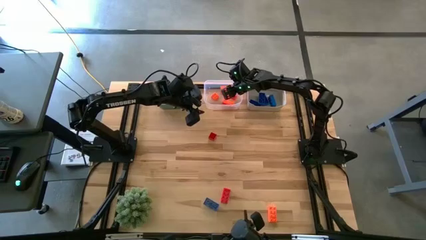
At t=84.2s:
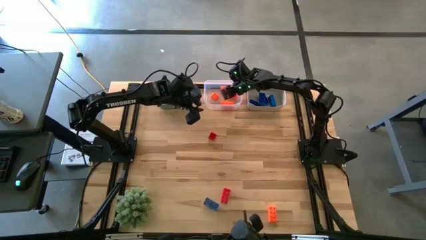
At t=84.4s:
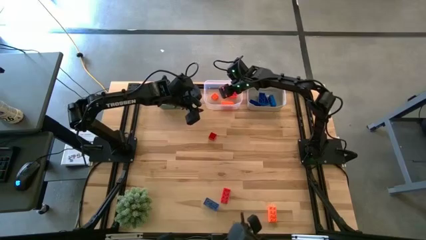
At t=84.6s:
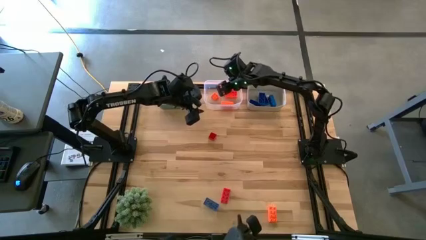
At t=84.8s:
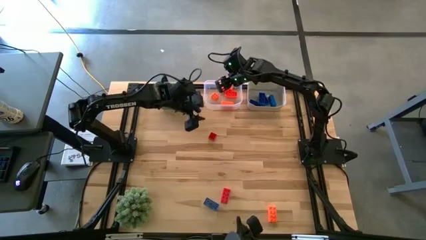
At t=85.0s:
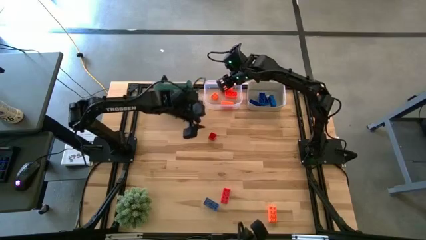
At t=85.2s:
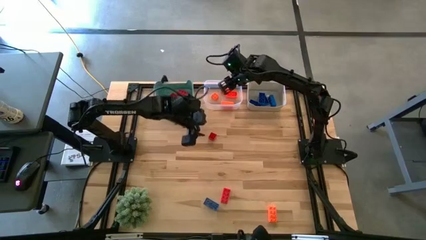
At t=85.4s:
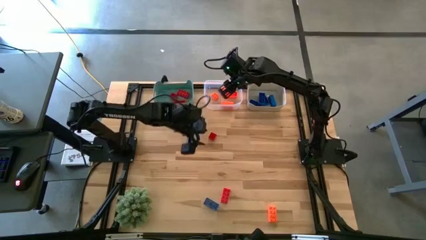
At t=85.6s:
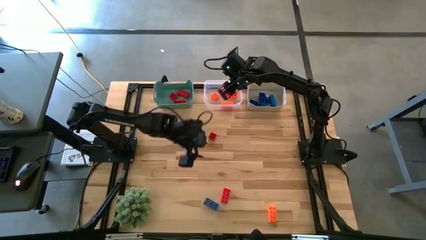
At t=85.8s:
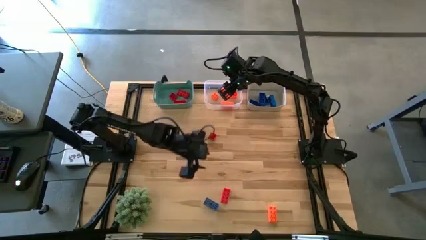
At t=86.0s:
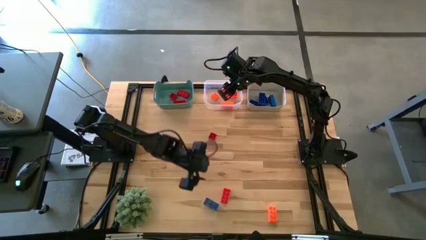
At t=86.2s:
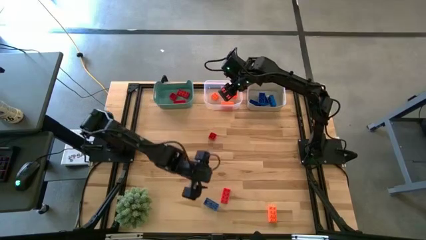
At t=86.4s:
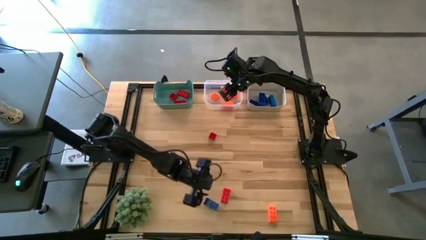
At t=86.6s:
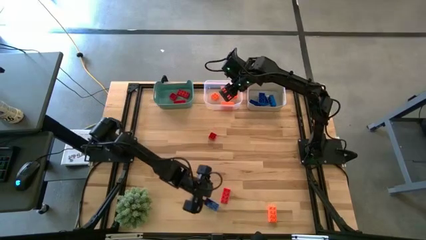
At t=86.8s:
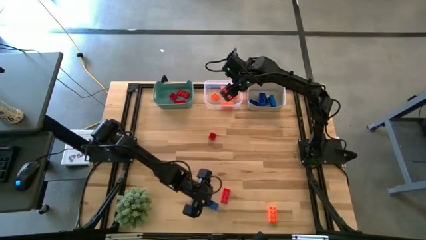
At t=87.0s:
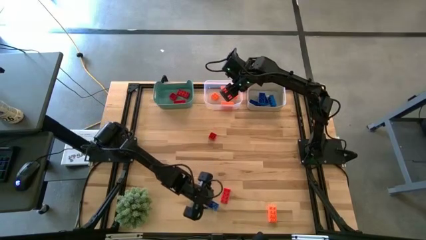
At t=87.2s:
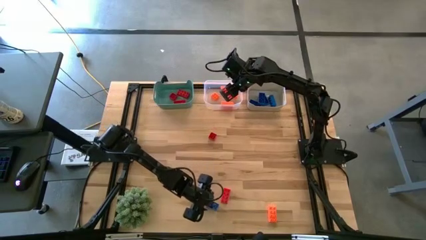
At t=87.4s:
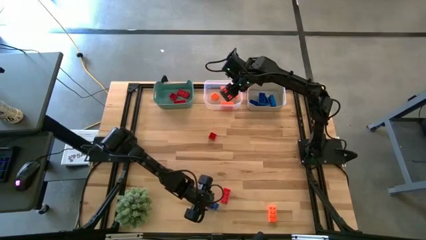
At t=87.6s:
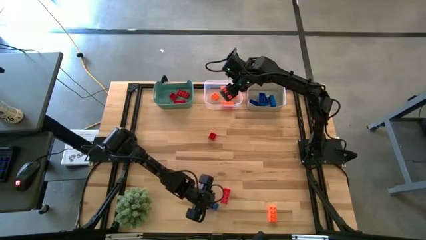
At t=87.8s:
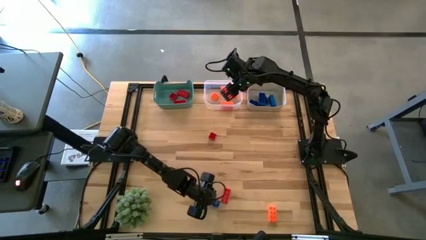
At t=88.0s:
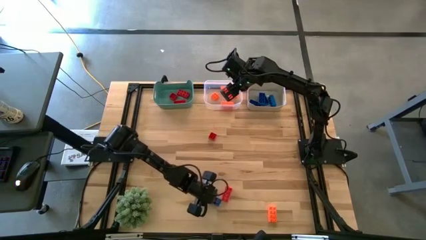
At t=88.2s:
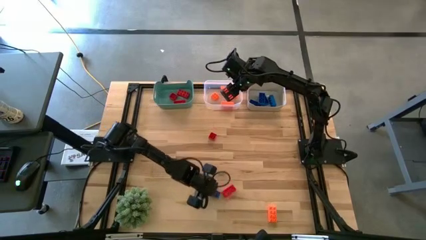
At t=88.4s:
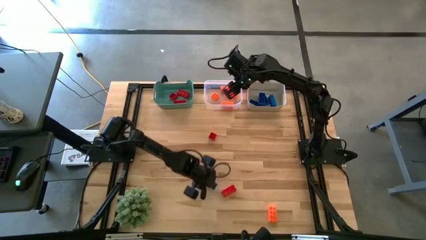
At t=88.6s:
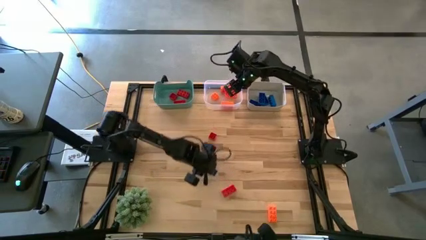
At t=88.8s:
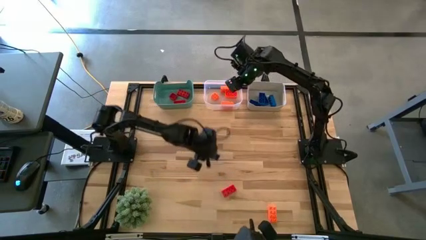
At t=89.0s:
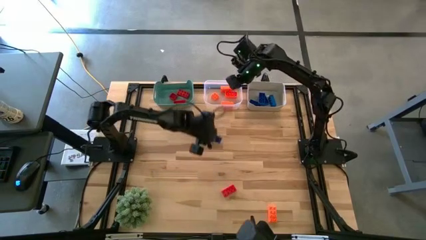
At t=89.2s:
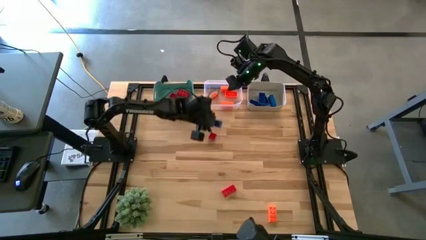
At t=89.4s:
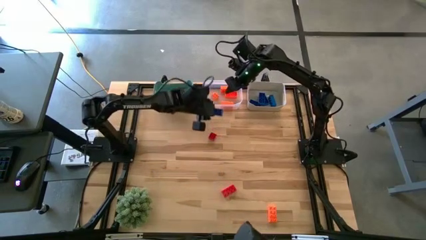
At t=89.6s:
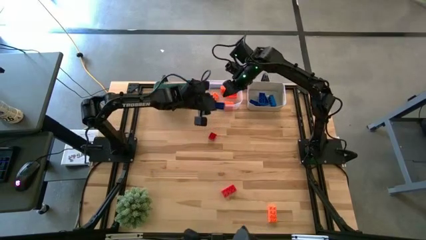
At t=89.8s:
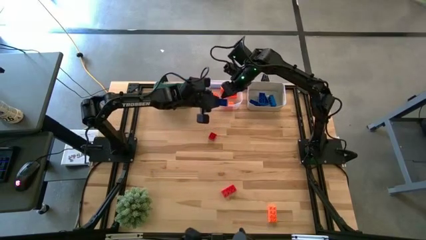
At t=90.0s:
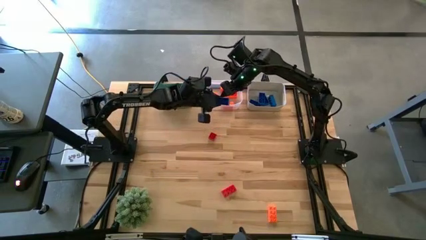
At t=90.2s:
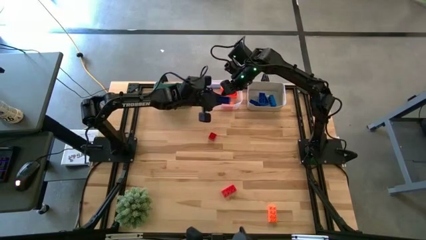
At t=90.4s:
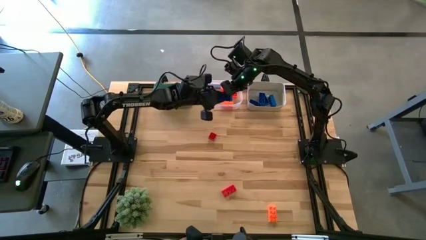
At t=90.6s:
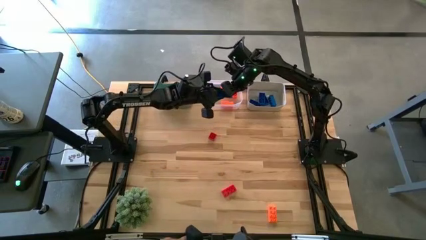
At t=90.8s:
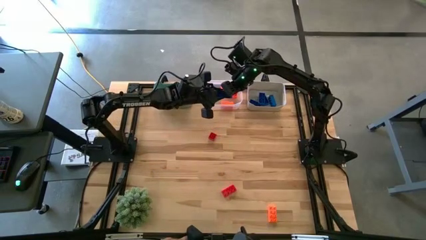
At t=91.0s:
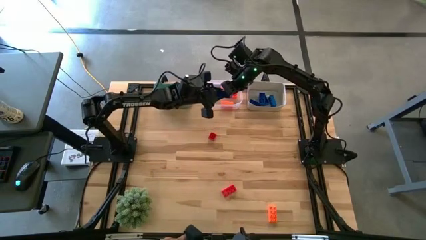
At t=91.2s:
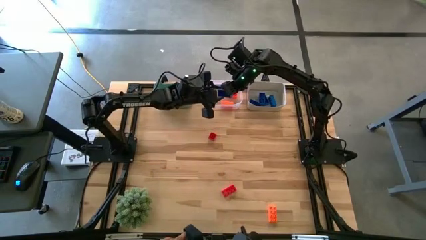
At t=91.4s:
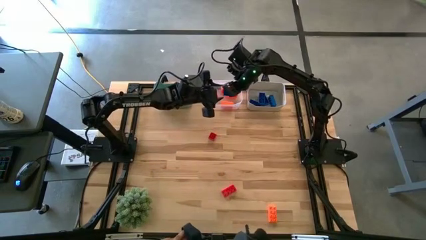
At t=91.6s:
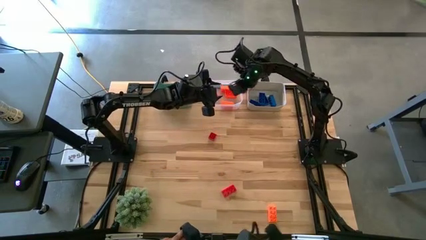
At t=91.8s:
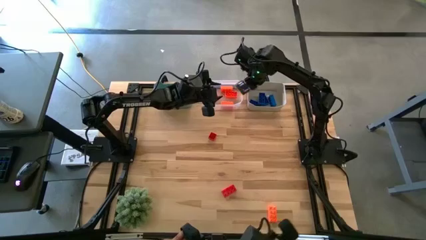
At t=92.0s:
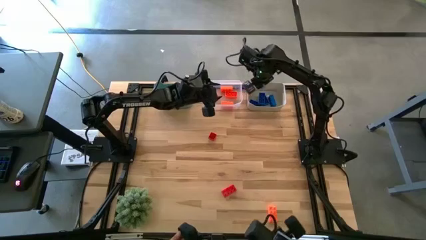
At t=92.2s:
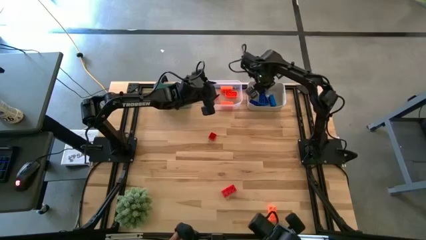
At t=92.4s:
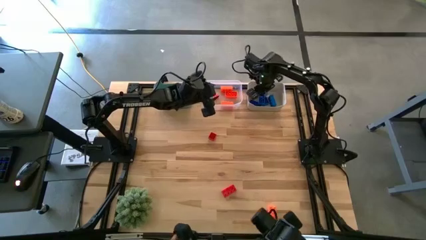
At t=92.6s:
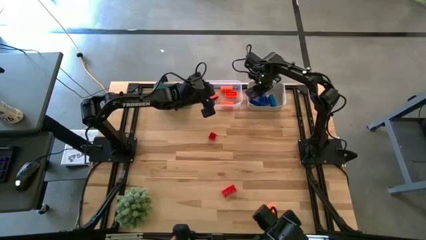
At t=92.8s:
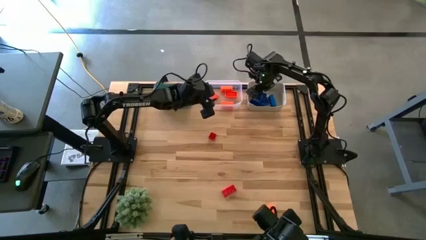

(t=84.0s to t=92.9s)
Task: Sort & place blocks by color
Put the blue game piece into the white bin

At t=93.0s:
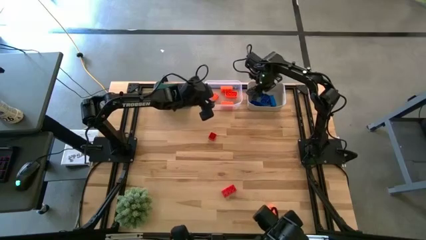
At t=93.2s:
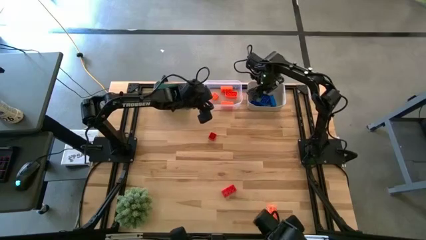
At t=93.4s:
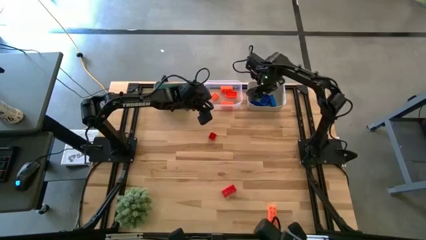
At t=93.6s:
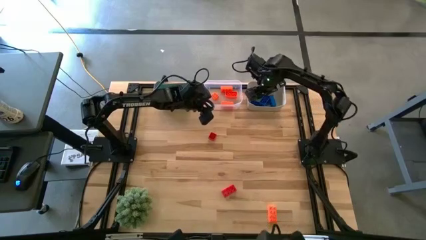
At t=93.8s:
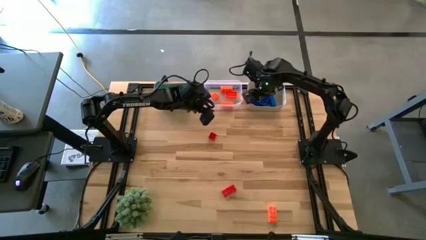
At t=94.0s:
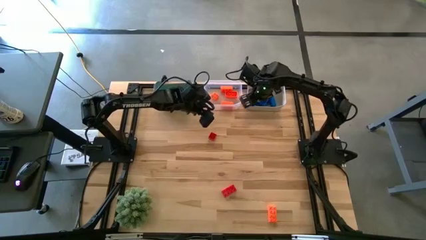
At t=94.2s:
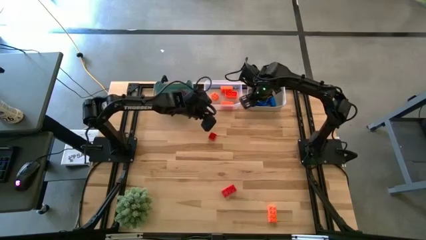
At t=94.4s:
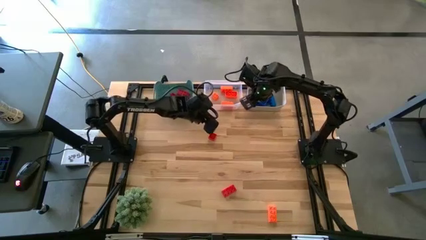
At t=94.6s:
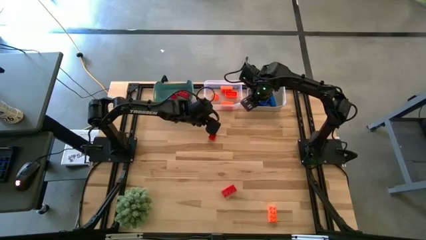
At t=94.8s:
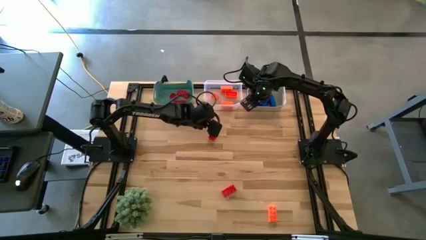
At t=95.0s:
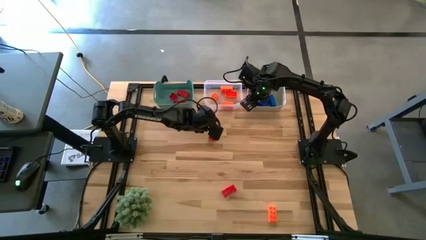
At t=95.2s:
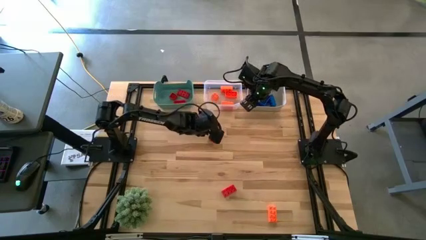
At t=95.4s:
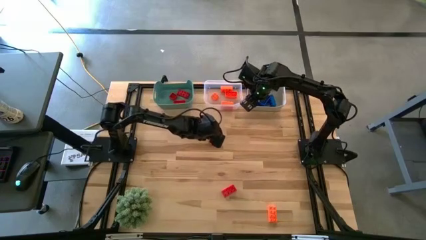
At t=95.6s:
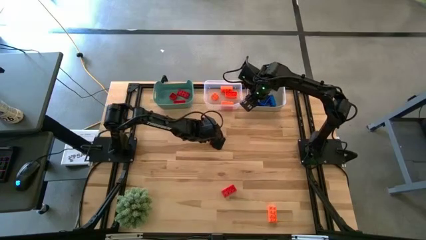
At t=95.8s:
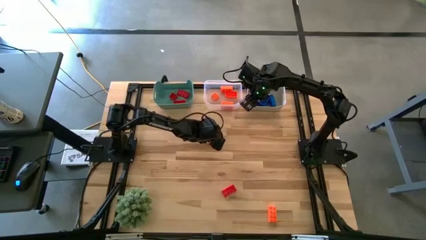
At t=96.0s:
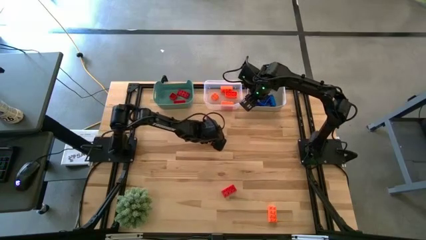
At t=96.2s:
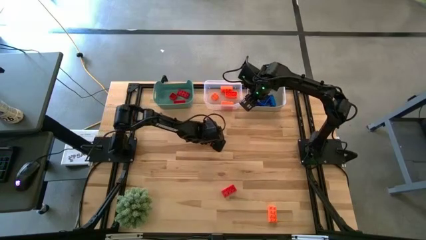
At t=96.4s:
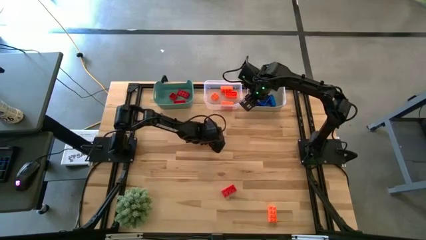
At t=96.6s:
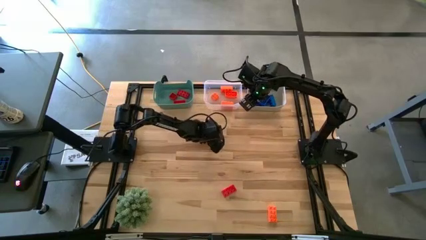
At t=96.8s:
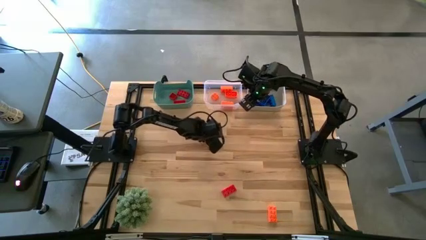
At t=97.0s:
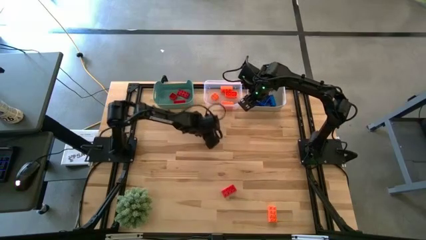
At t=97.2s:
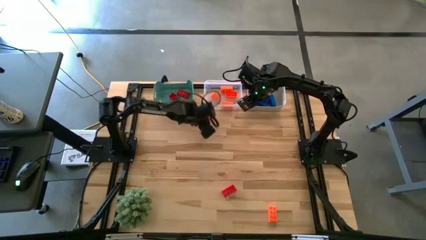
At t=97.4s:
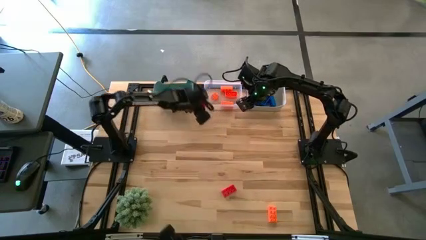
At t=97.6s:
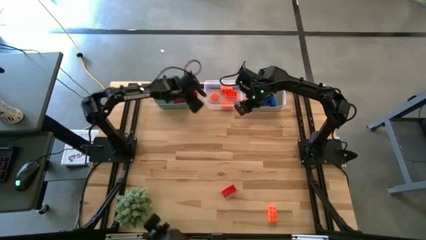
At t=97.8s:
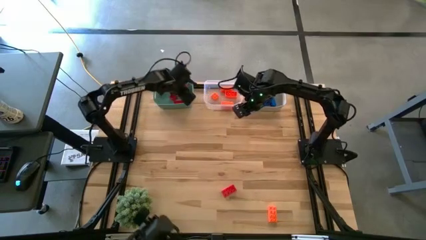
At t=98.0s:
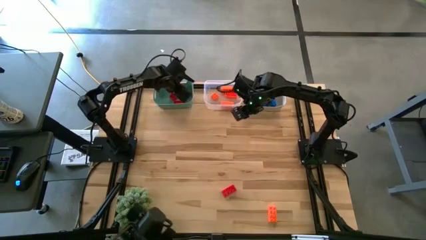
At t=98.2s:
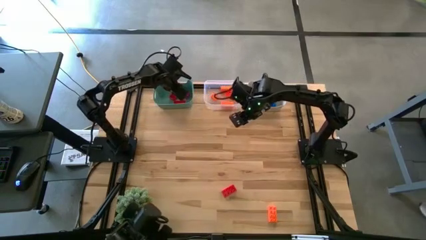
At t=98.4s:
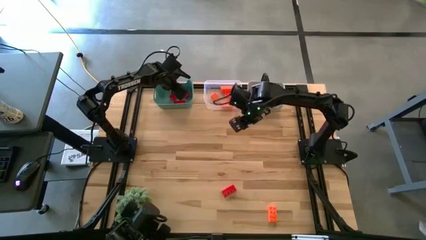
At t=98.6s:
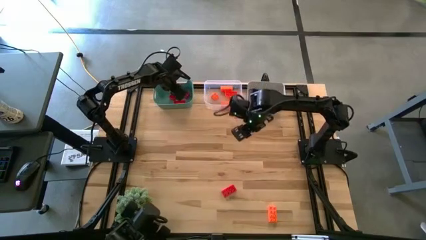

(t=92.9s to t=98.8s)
Put the red game piece into the blue bin

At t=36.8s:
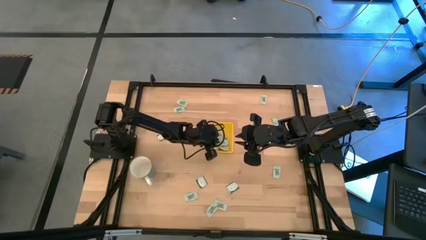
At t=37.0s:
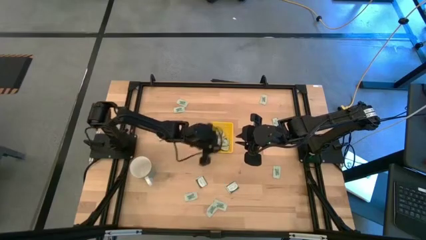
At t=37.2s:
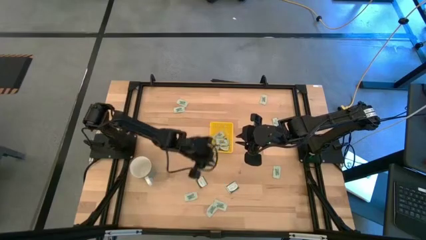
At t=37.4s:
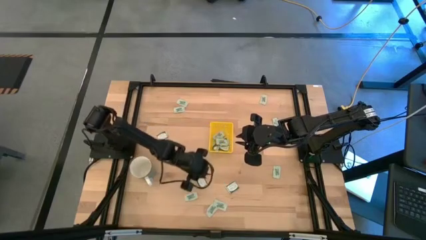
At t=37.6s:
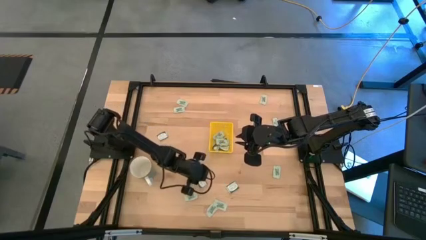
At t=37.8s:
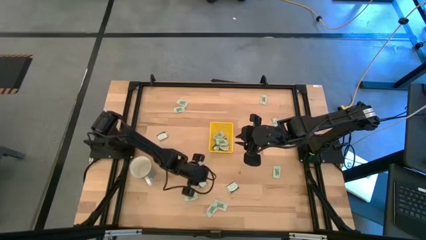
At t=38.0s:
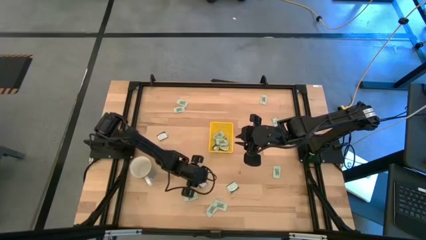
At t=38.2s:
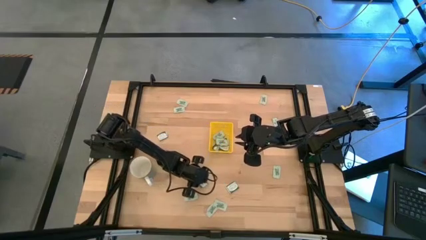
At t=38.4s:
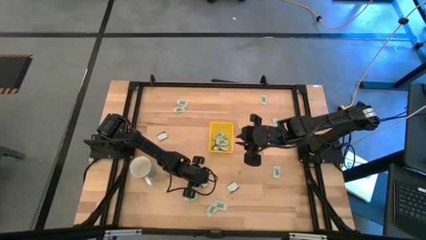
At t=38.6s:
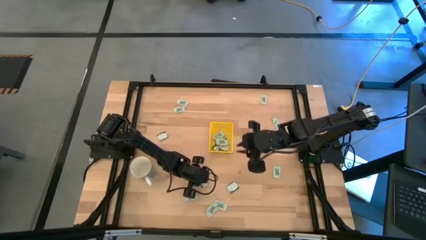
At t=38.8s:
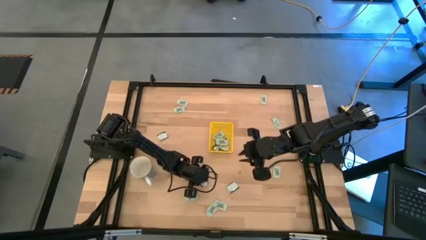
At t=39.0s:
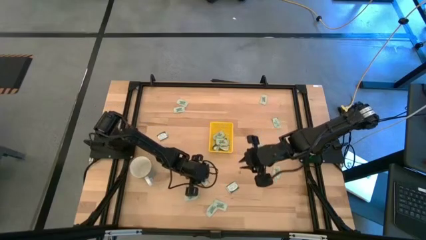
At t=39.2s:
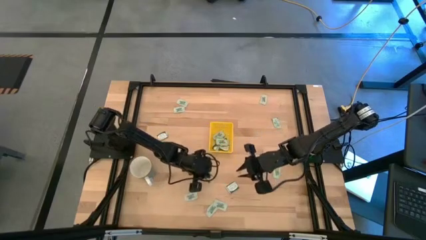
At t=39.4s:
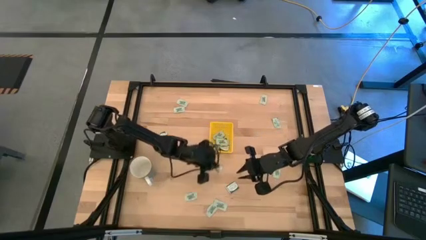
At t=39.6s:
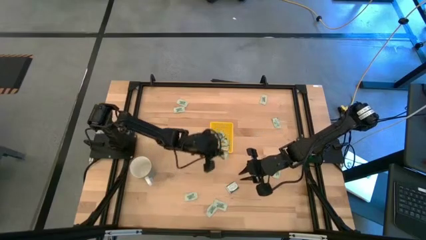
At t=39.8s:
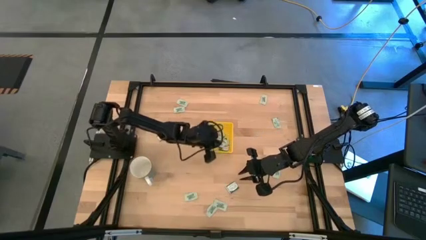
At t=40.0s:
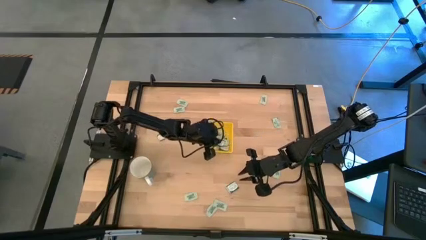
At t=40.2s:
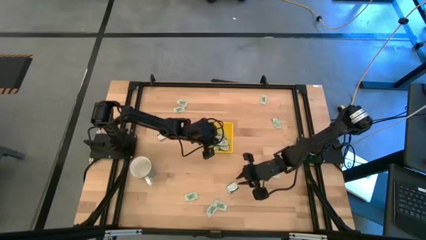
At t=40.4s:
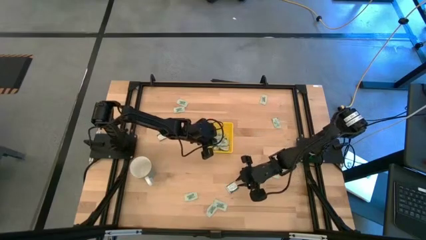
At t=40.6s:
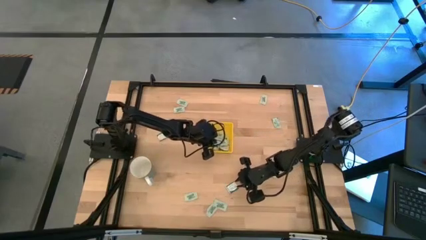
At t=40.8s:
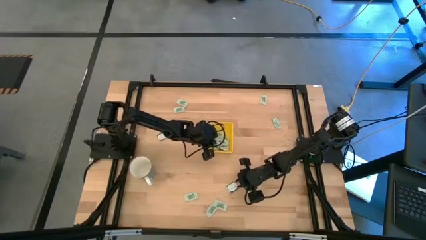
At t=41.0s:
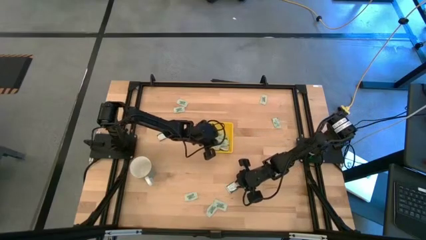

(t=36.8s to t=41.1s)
Task: Pick and place Stevia / Truvia into bins
Put the bottom left green stevia packet into the yellow bin
